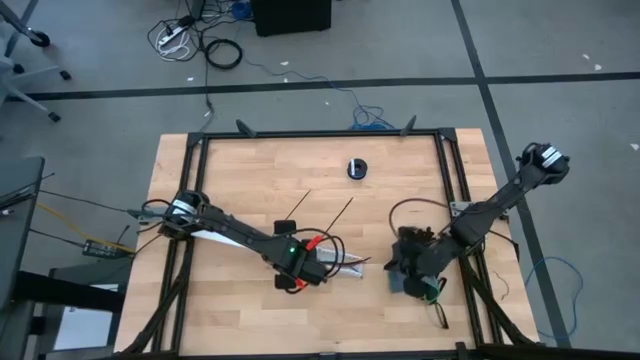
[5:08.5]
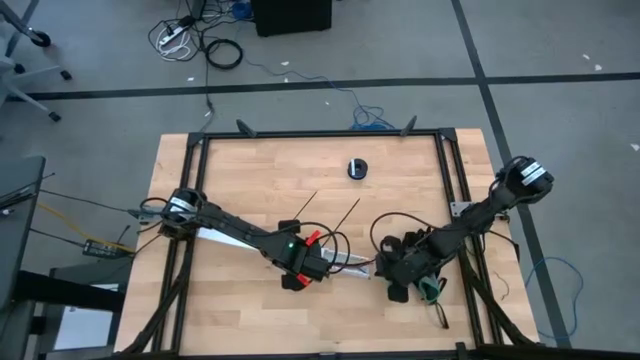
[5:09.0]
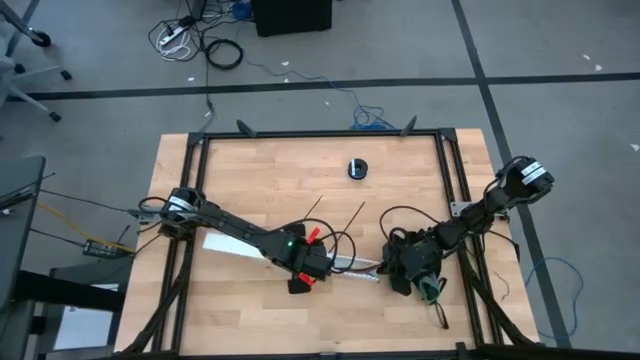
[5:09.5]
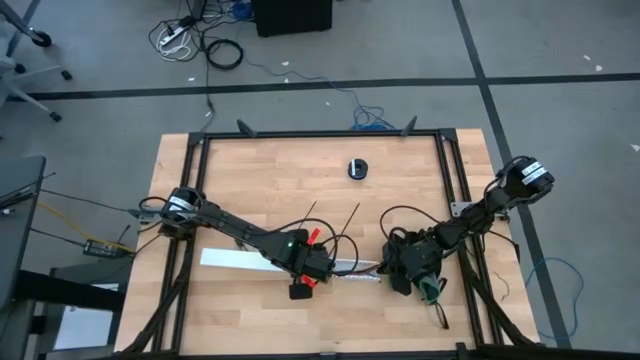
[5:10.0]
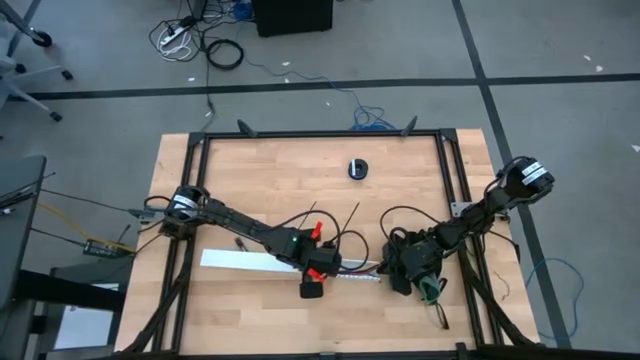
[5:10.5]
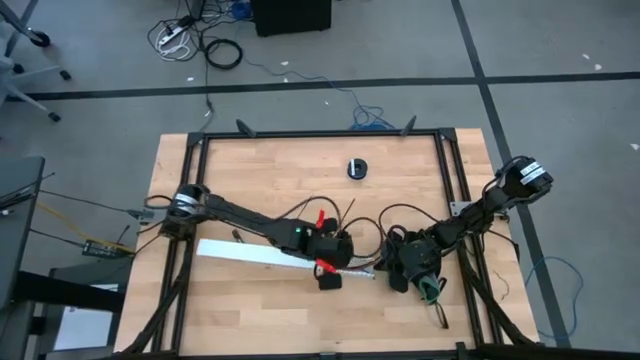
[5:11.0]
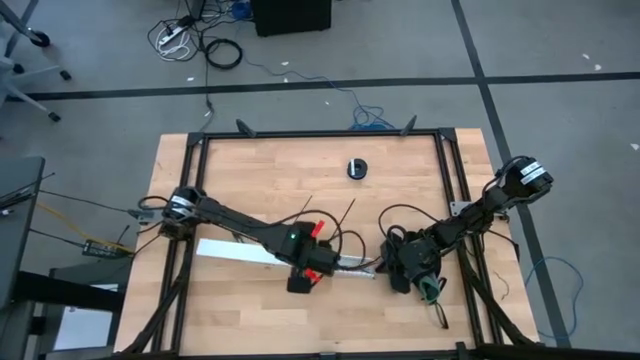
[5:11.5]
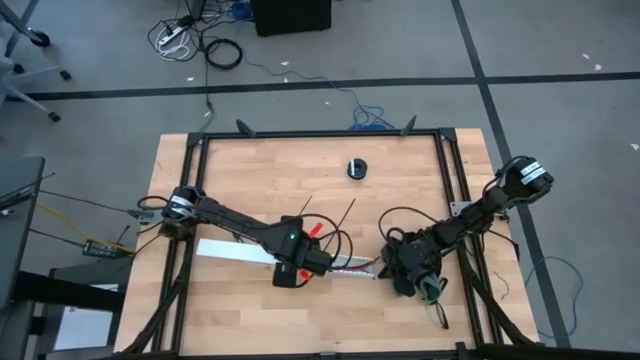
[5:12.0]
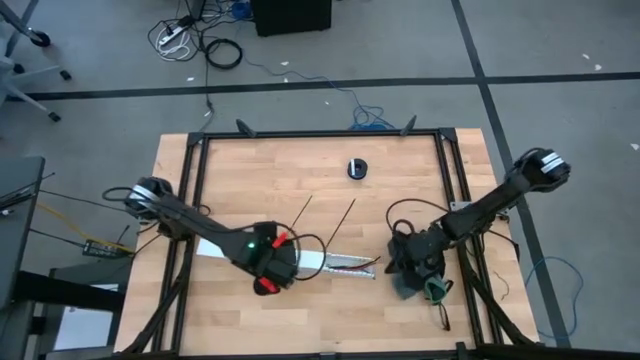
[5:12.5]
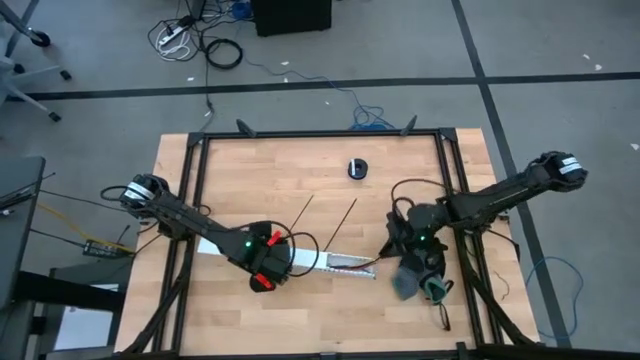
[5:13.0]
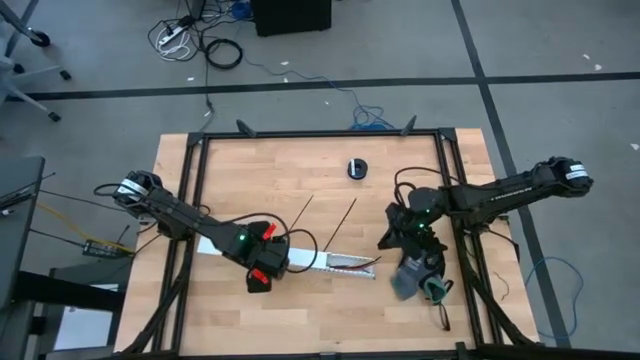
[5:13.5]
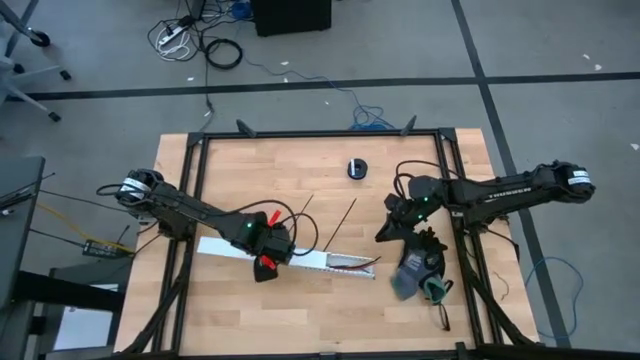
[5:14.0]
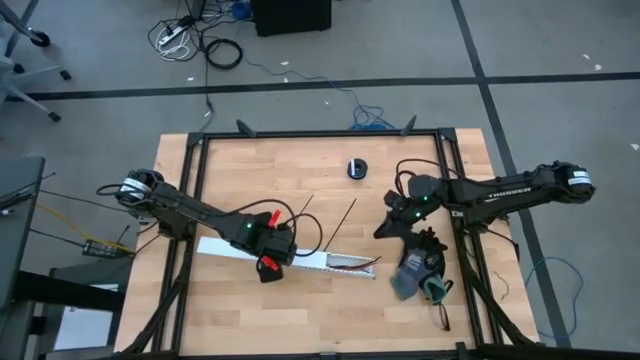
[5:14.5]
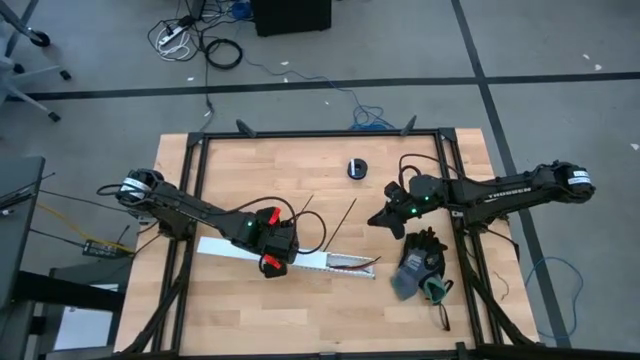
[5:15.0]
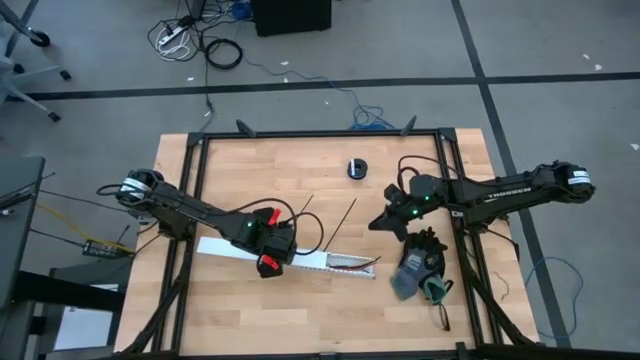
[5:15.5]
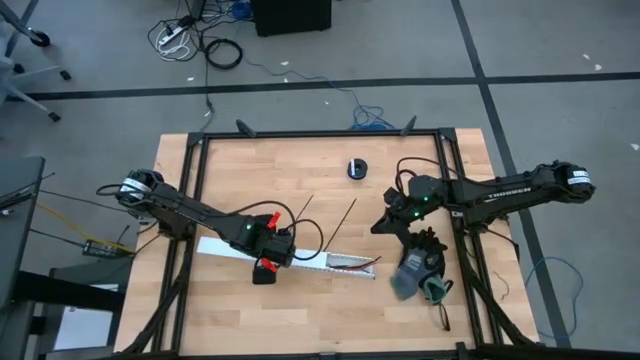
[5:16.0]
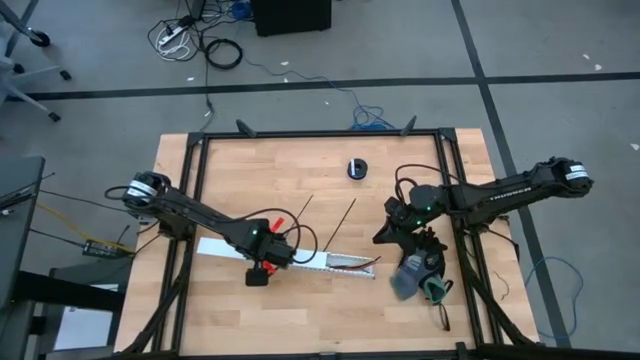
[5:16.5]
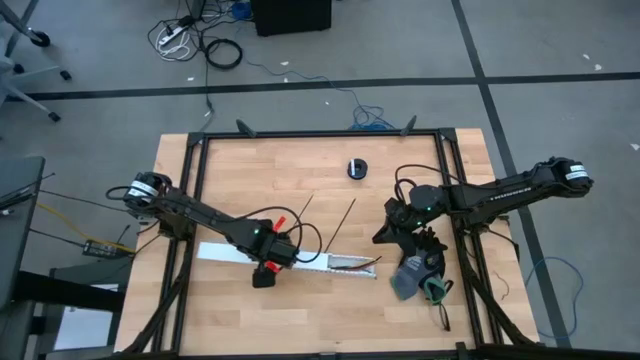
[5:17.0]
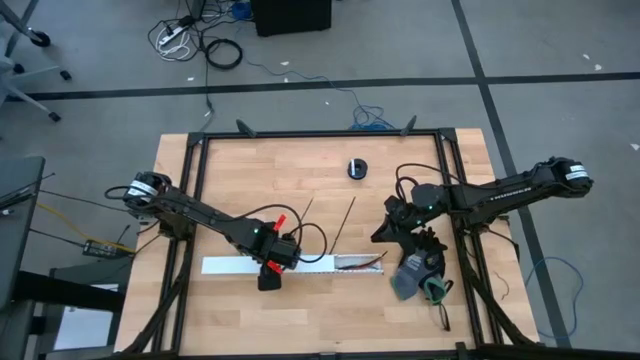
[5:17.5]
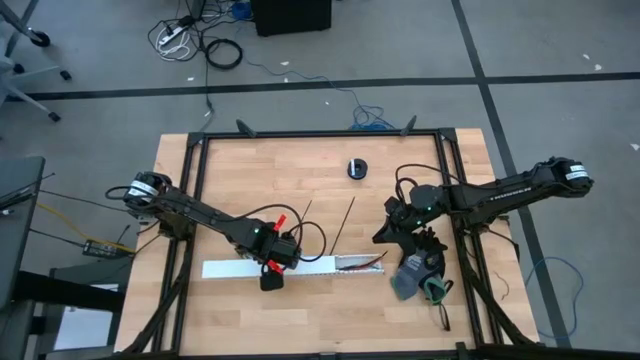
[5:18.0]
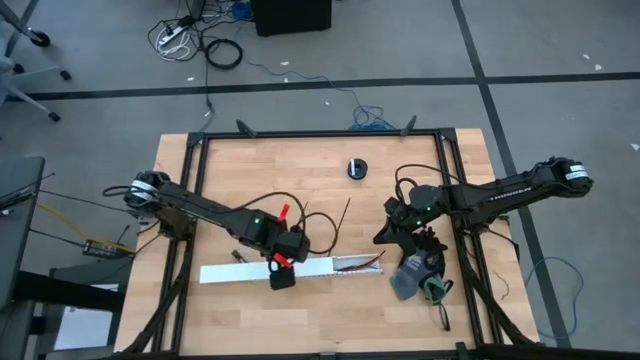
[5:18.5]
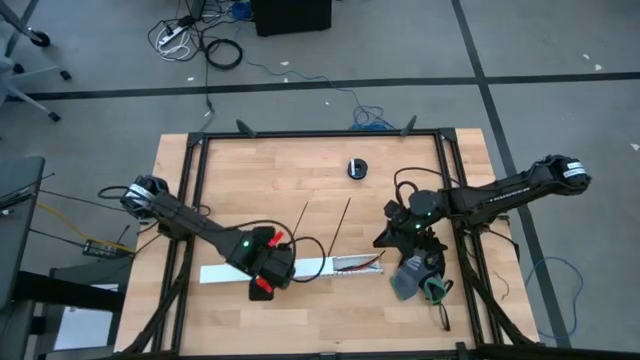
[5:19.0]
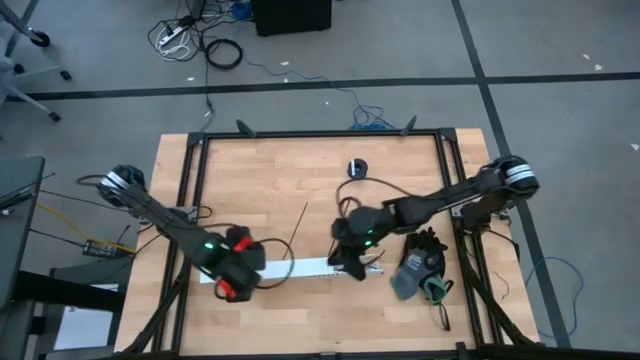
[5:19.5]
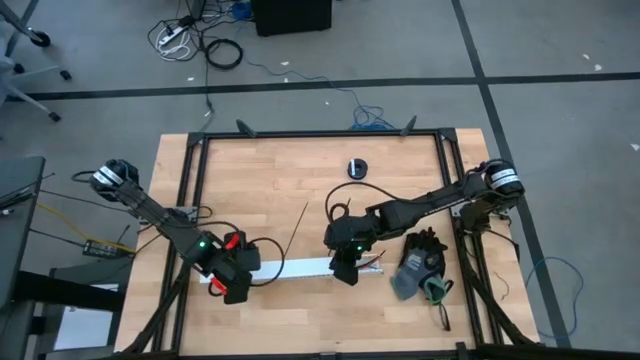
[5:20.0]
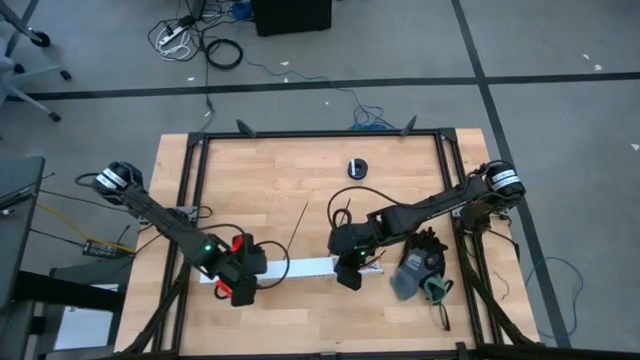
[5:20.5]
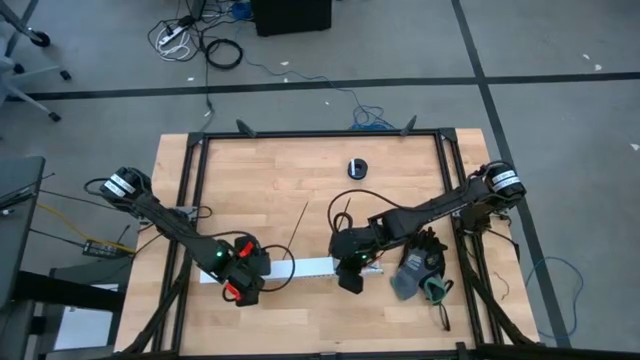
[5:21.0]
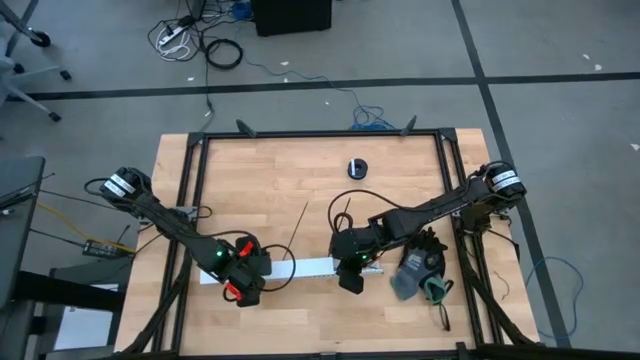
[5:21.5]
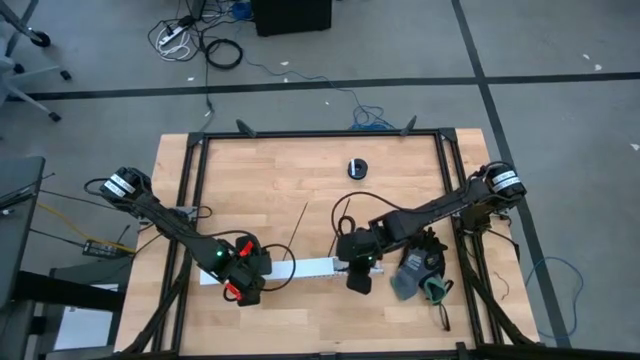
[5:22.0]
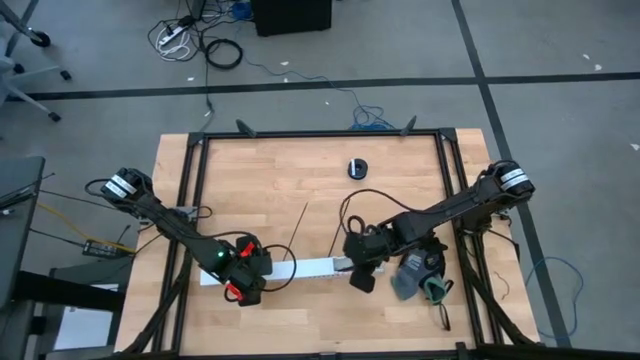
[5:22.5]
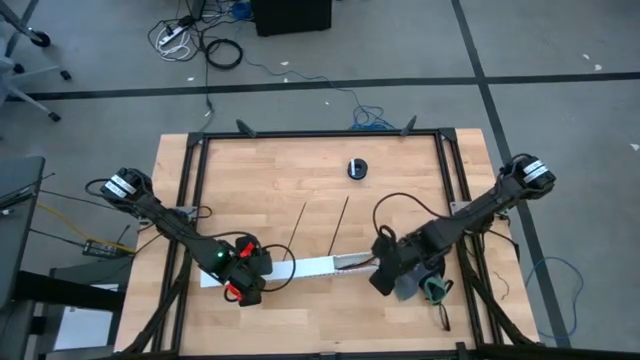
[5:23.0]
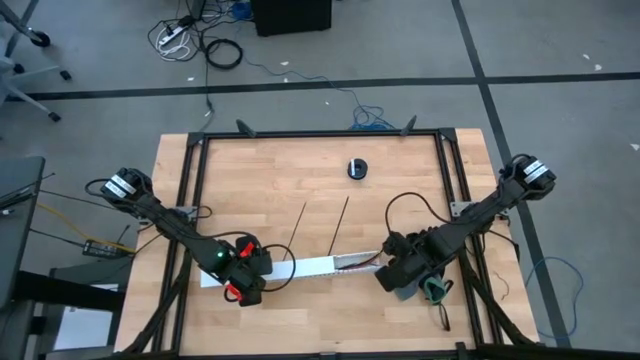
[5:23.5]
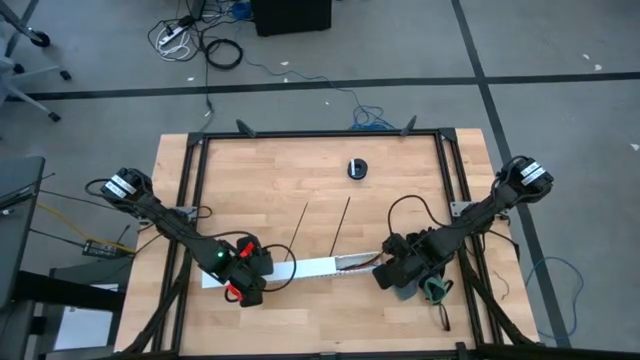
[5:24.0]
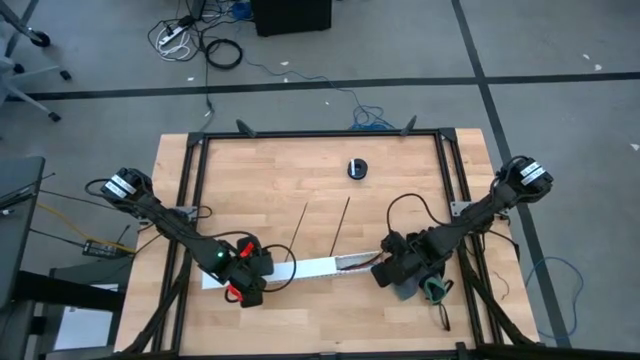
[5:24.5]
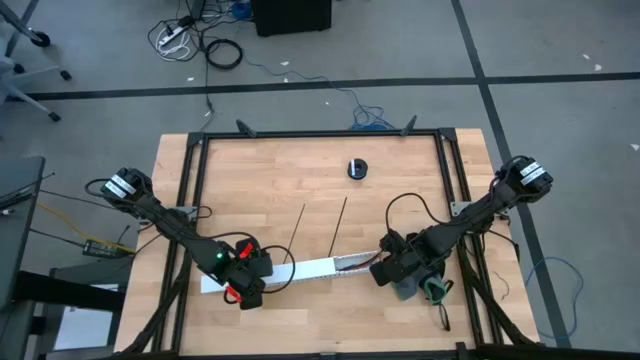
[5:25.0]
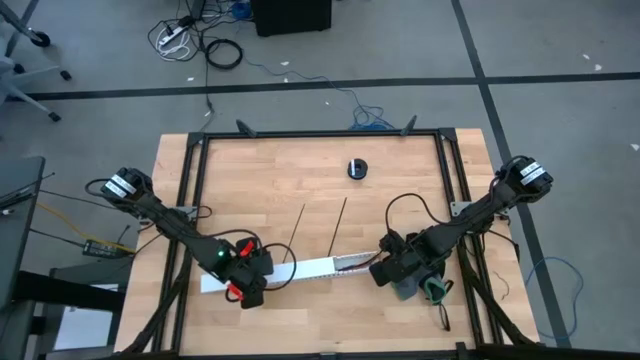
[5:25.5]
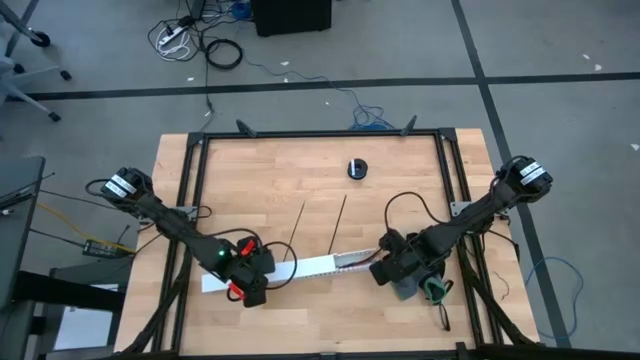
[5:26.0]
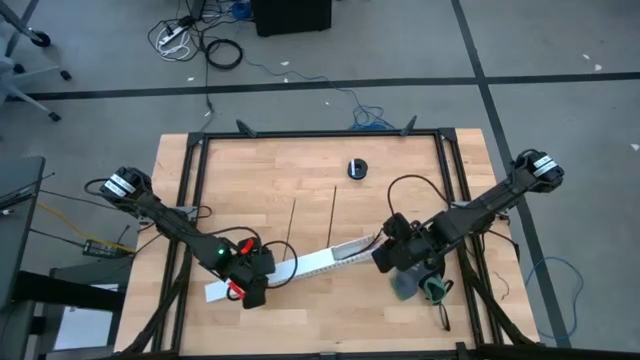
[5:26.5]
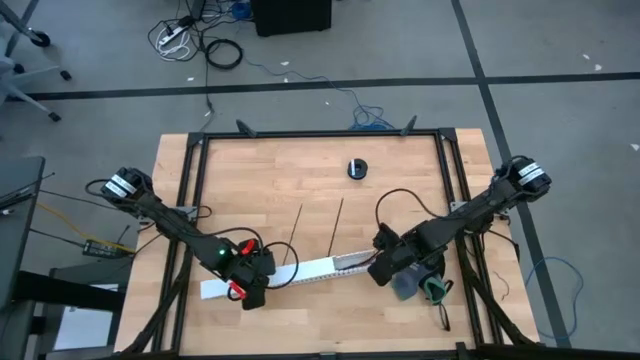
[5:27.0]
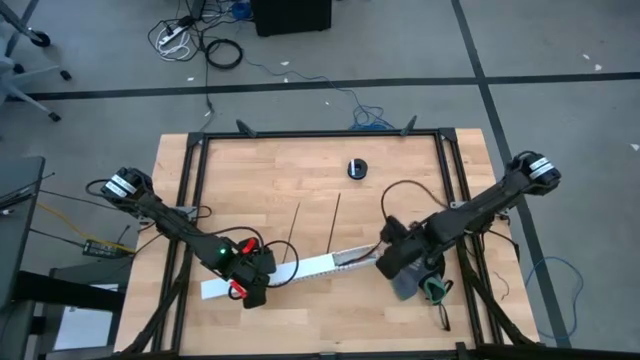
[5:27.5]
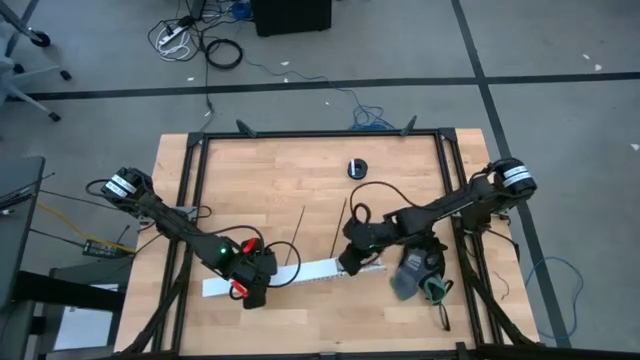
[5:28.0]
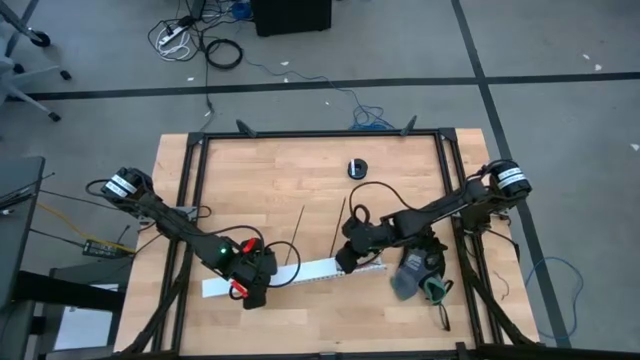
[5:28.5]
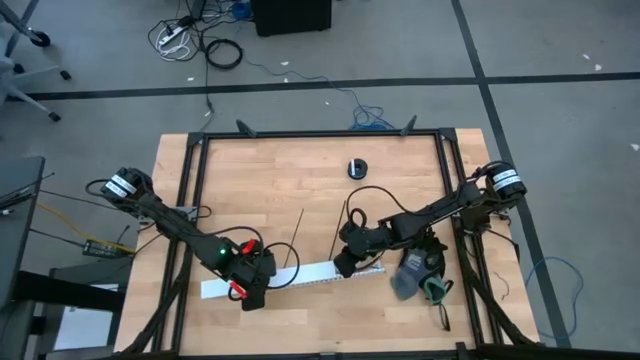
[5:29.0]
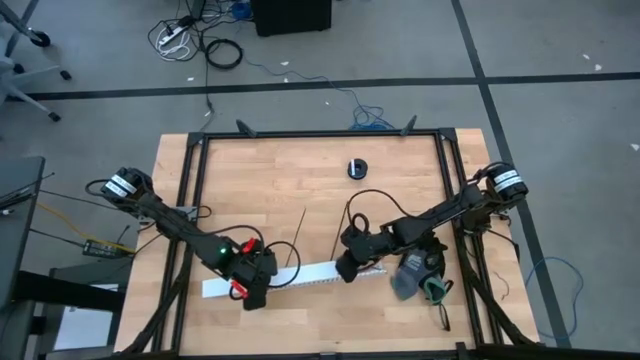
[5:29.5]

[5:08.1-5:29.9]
Task: Ziptie cables
Close the white cable duct
